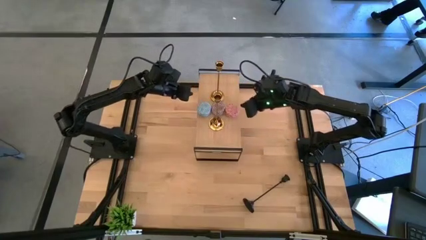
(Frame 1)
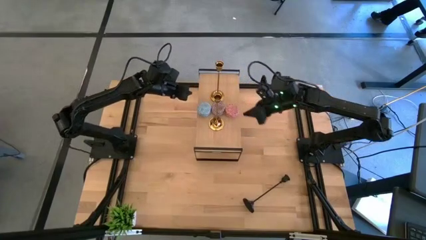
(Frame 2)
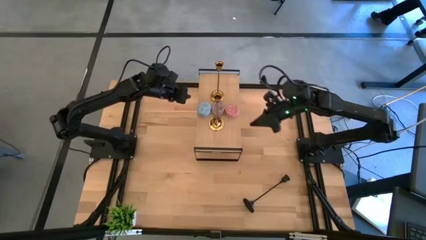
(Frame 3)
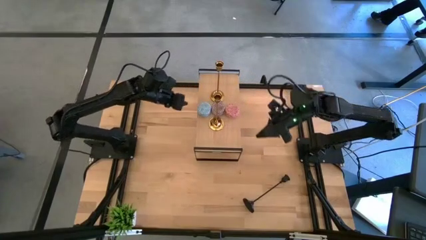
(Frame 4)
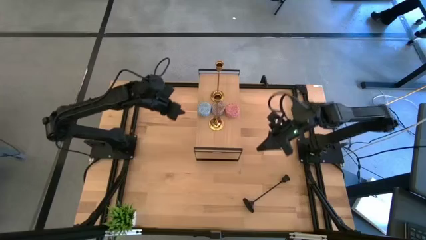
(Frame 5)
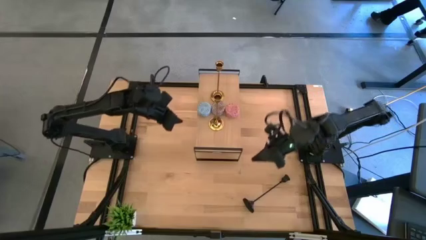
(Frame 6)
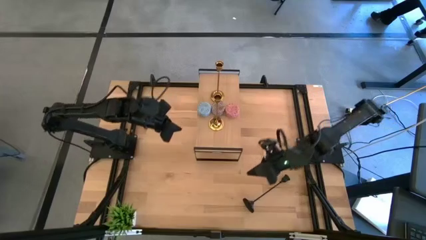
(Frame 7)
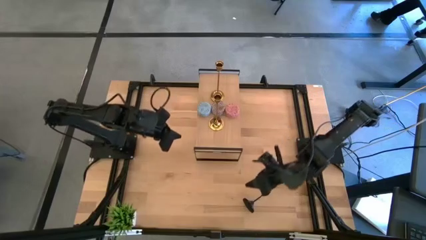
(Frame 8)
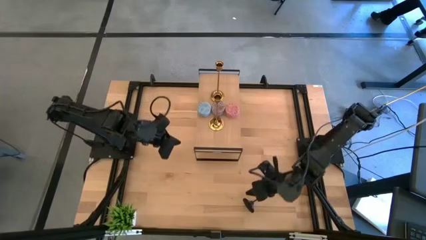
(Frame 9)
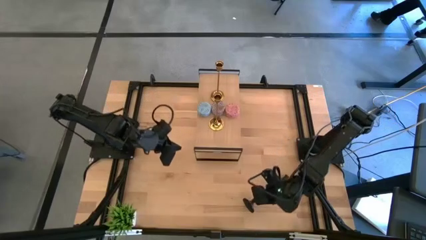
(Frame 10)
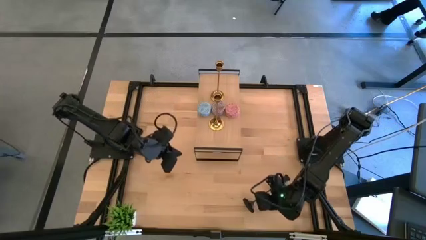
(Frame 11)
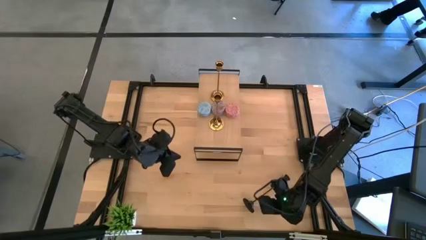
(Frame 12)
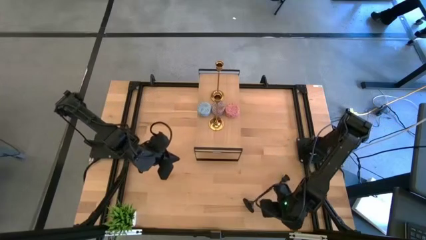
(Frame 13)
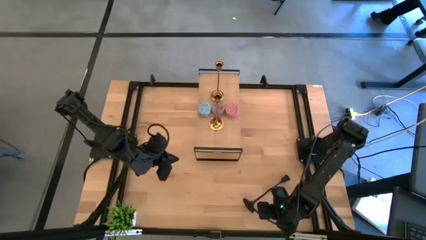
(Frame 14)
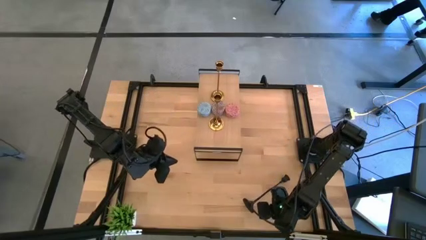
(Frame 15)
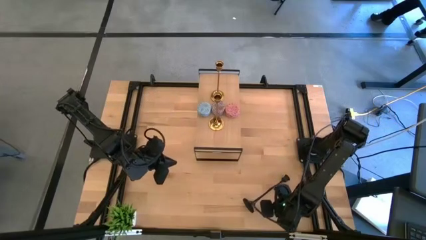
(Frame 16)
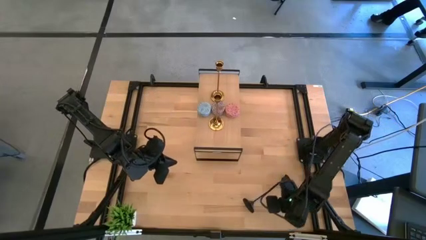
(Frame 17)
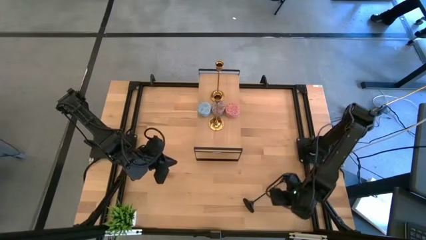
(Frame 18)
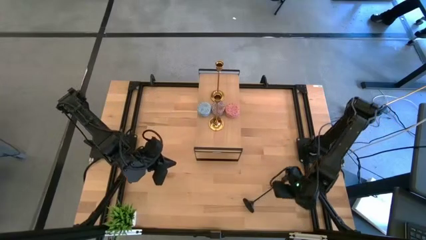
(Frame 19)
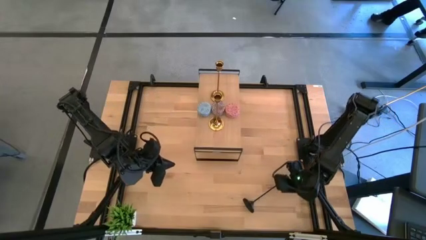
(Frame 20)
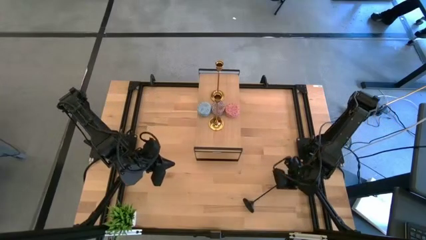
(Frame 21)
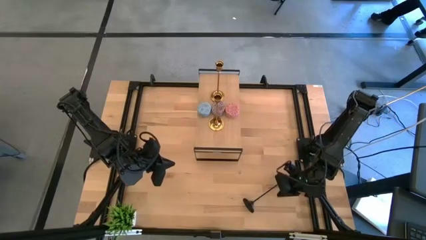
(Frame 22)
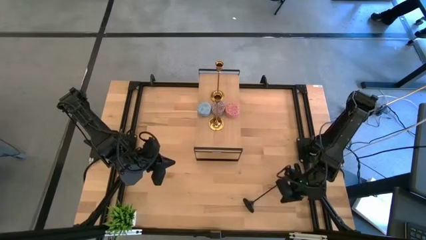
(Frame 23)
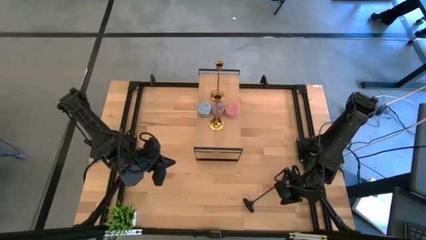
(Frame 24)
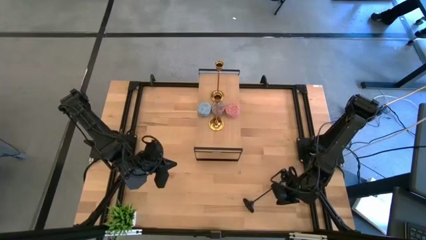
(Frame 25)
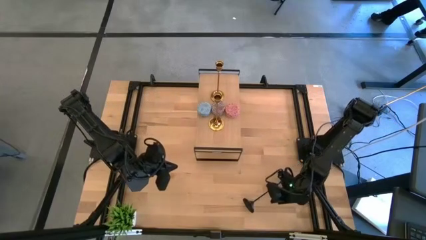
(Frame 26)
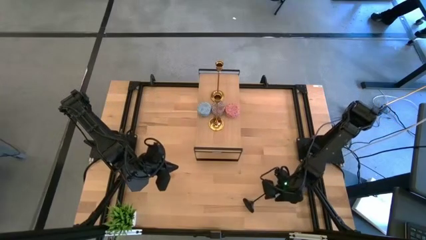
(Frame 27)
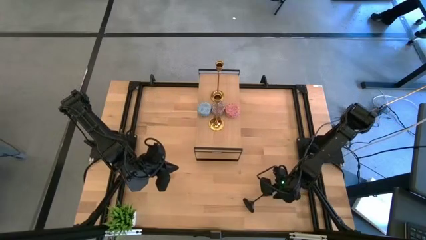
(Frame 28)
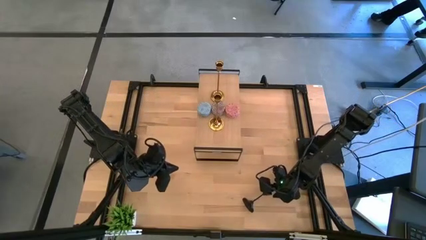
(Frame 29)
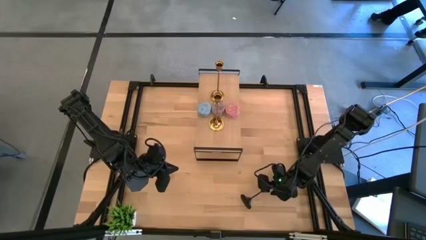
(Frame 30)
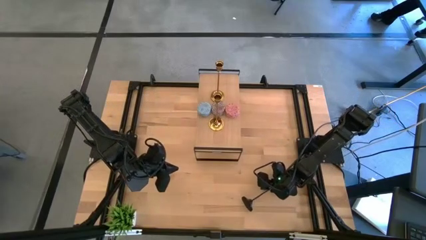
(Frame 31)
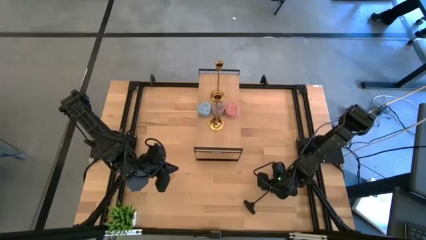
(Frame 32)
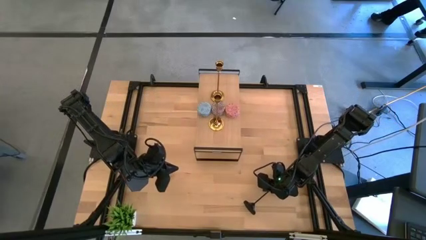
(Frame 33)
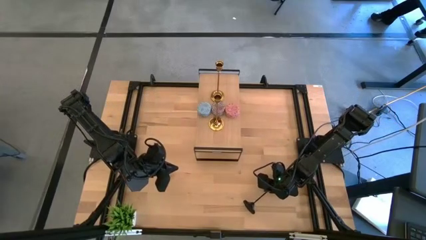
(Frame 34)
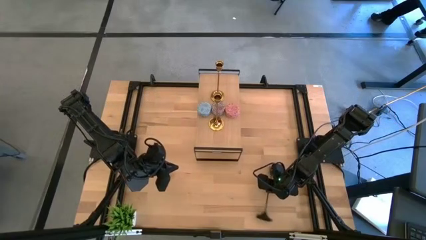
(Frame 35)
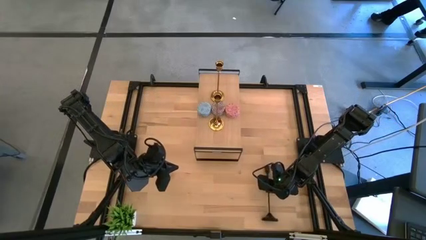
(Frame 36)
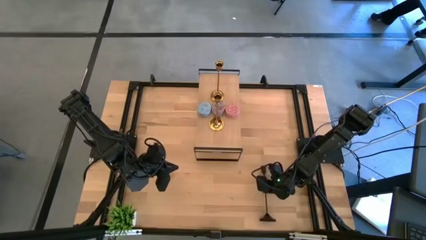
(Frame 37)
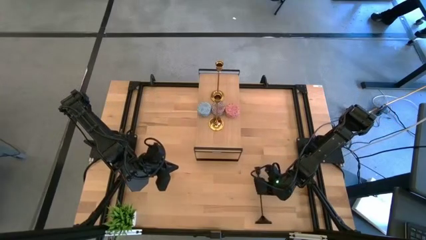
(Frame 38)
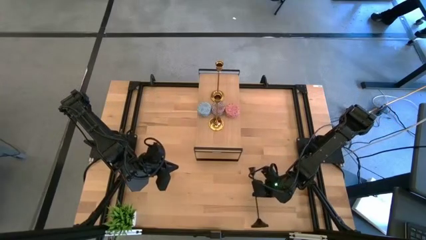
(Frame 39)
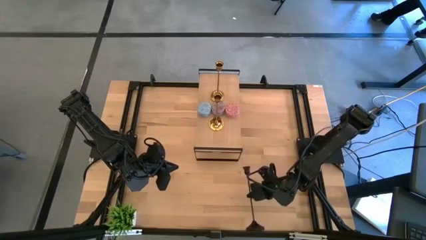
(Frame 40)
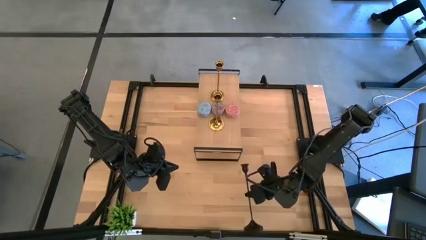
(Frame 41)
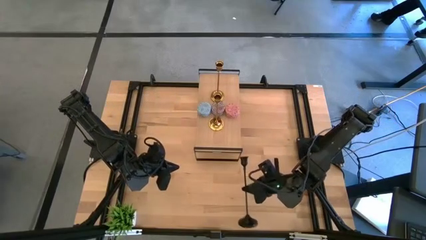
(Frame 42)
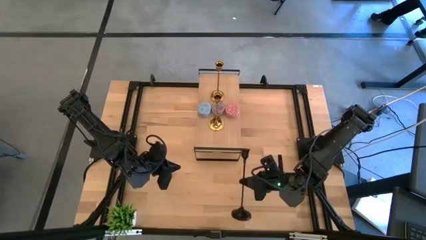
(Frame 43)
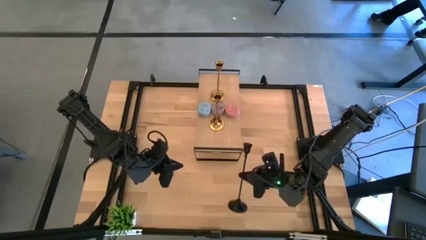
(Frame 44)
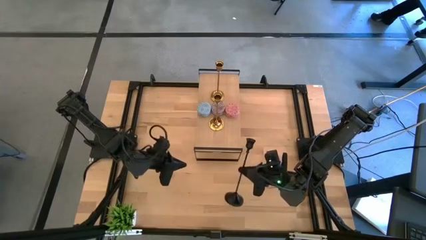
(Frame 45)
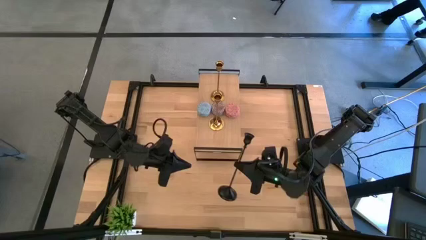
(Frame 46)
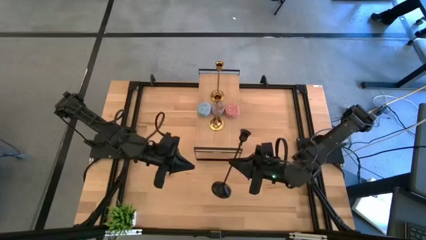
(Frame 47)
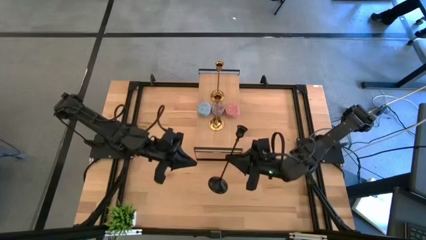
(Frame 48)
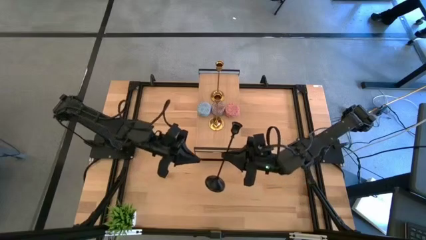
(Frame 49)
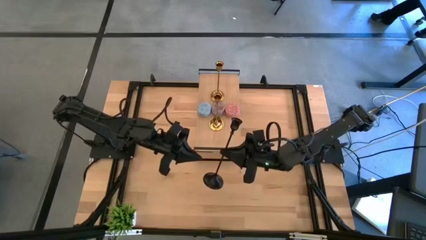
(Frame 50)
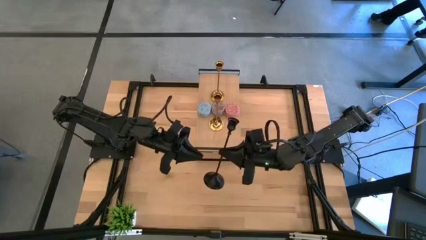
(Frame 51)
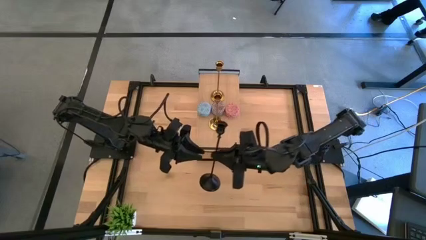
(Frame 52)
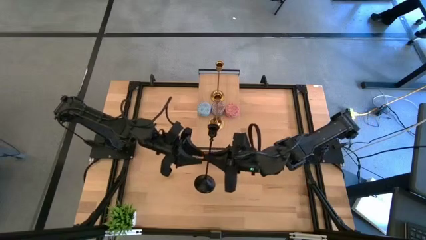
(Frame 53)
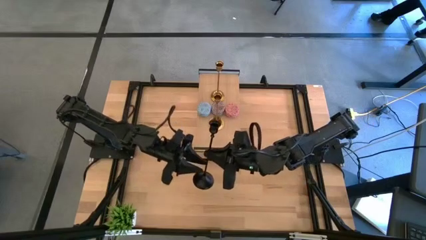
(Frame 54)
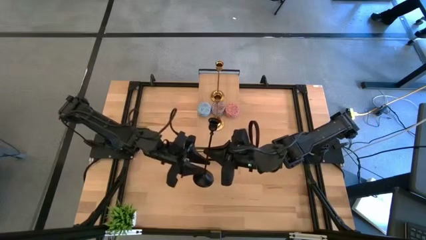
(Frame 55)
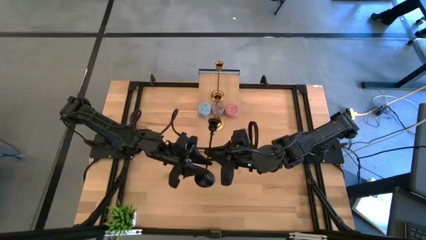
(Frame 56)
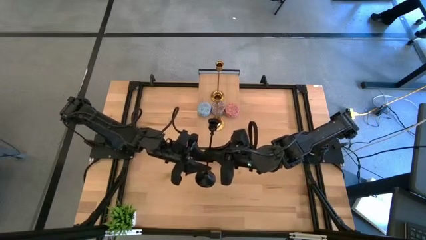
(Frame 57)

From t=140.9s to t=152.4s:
Task: Pick & Place candle stick holders
Put the black candle holder on the shelf

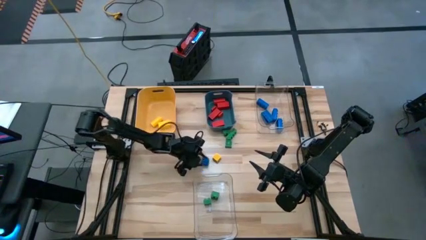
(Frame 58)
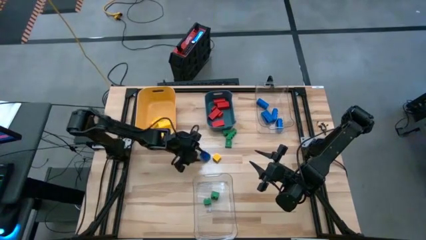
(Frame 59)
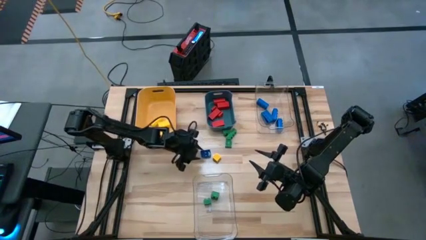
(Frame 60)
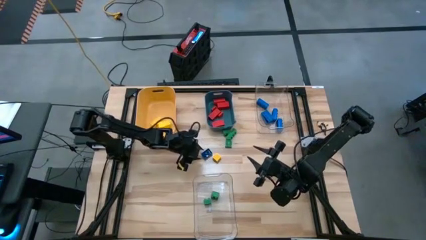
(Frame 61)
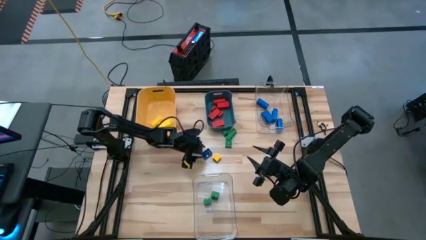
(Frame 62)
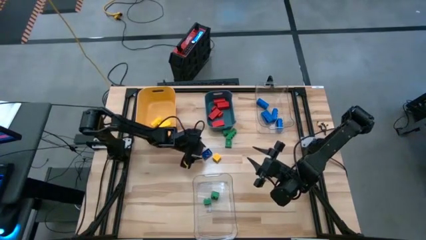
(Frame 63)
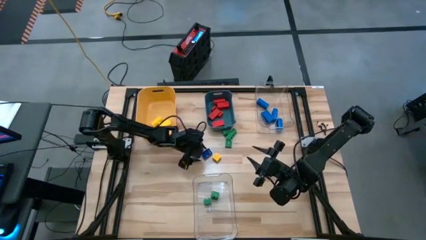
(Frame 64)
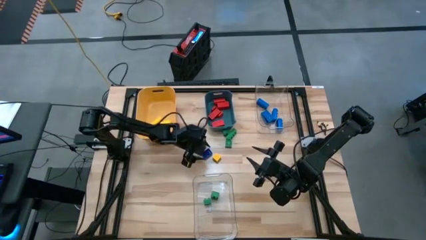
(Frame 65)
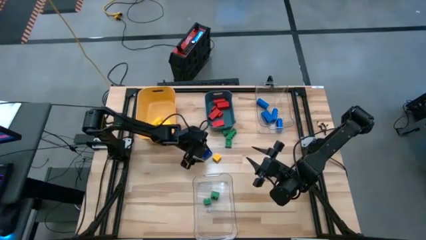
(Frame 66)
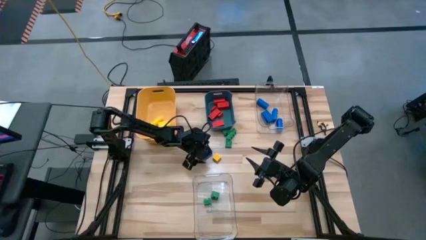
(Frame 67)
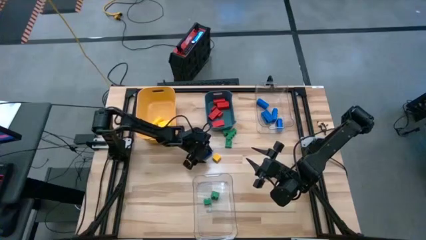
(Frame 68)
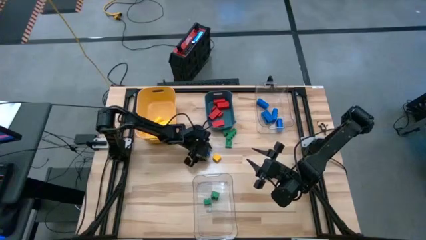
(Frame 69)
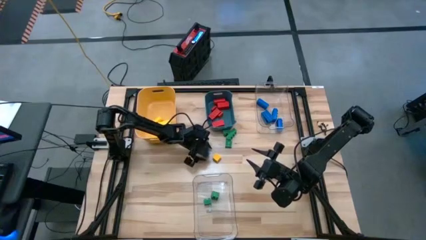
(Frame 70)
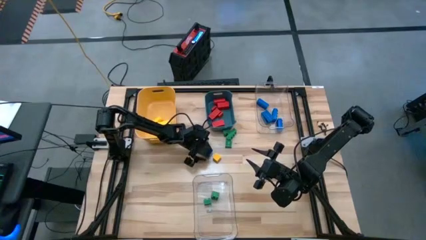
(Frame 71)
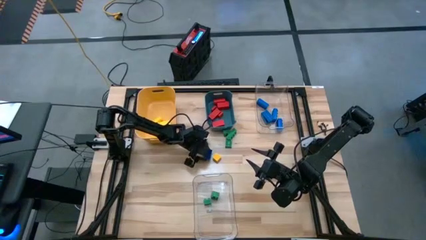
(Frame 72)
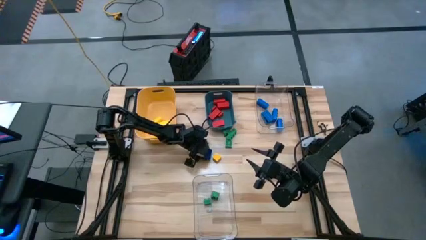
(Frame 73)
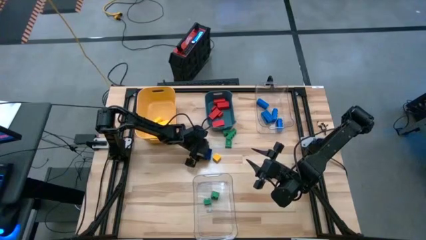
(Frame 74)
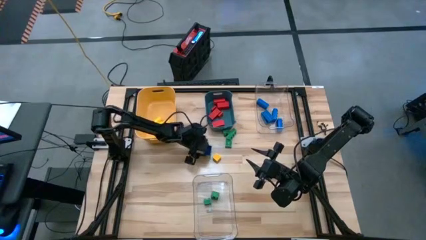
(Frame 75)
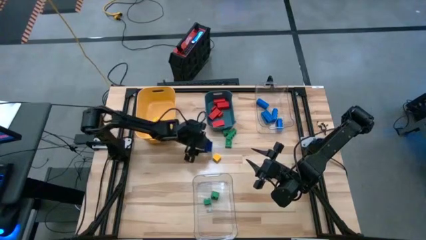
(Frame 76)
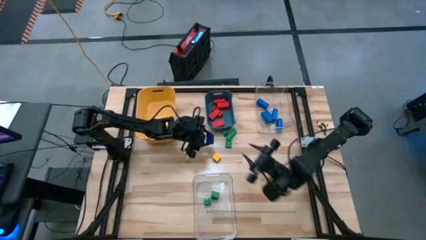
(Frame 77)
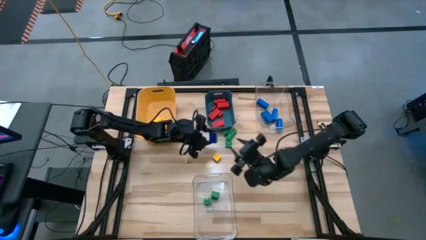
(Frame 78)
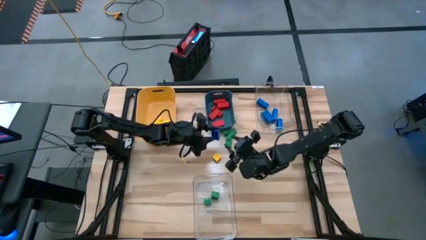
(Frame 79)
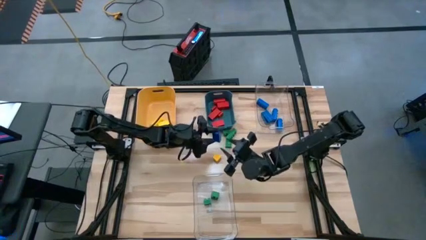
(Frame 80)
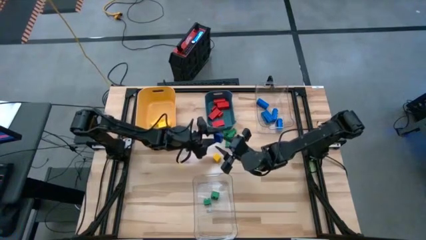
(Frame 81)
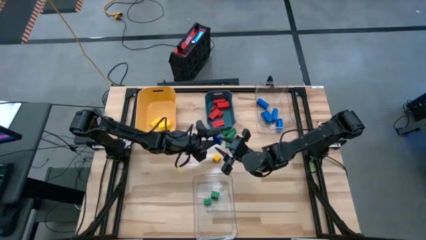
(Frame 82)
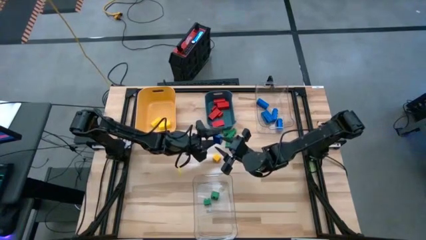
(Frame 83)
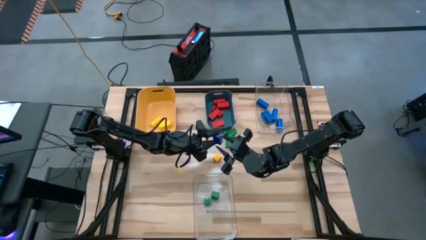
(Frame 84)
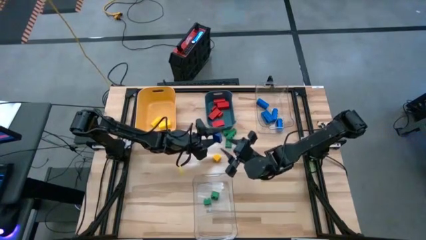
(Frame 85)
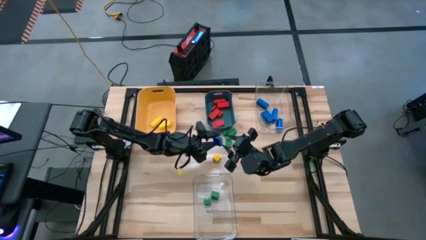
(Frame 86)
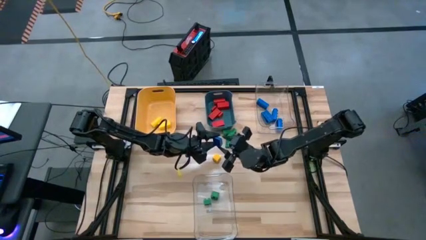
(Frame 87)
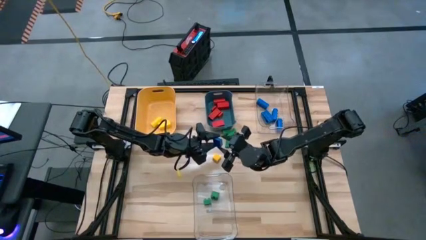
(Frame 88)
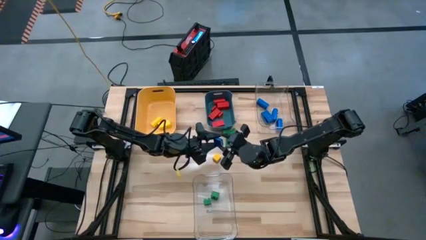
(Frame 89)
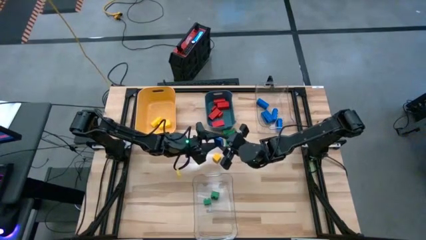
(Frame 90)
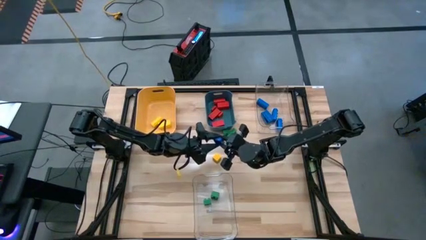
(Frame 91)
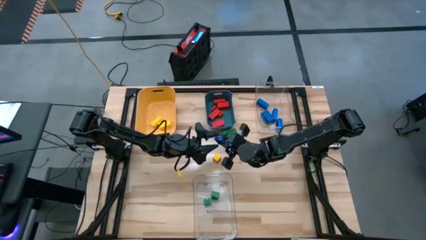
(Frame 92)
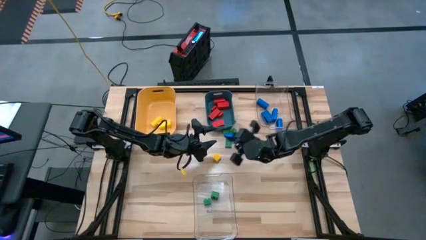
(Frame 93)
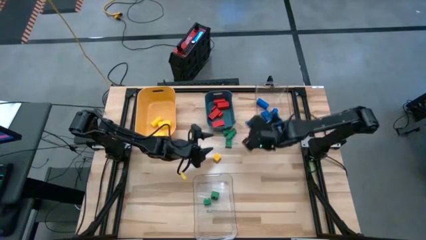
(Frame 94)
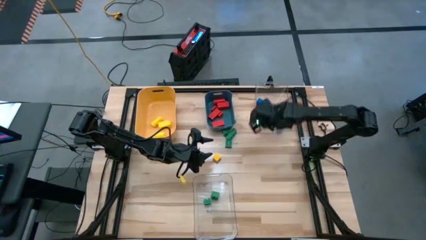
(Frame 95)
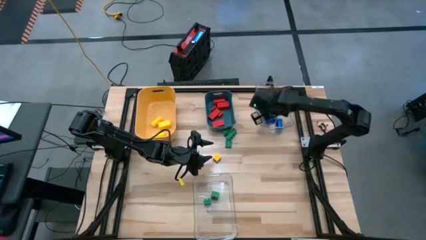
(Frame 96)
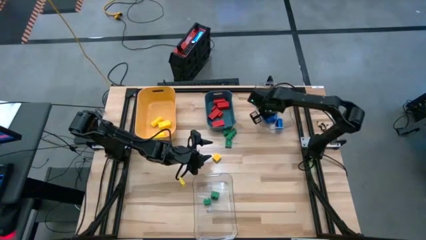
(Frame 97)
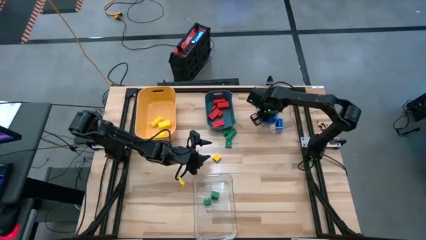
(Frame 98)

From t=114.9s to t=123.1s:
Task: Sort blocks
Put the blue game piece into the top transparent bin
